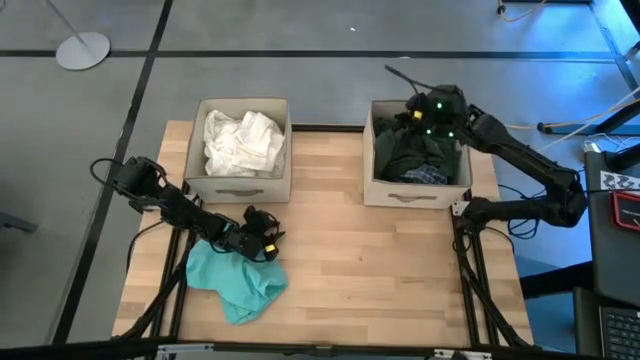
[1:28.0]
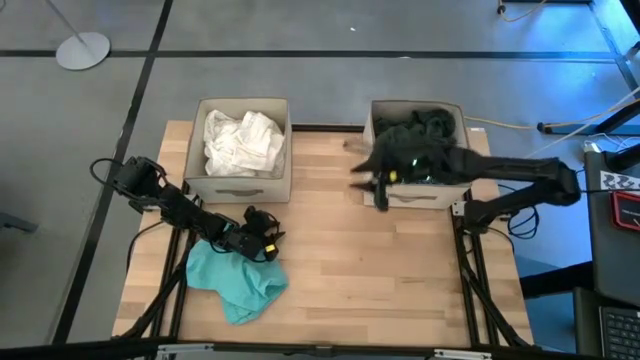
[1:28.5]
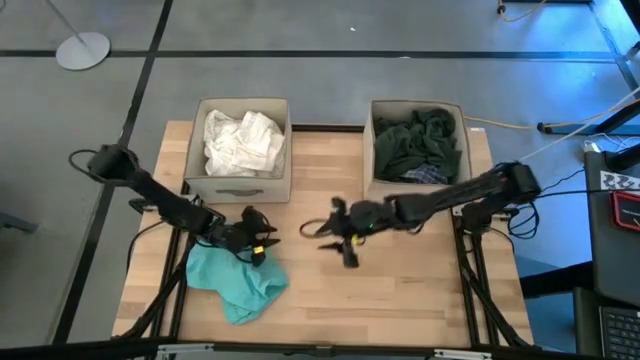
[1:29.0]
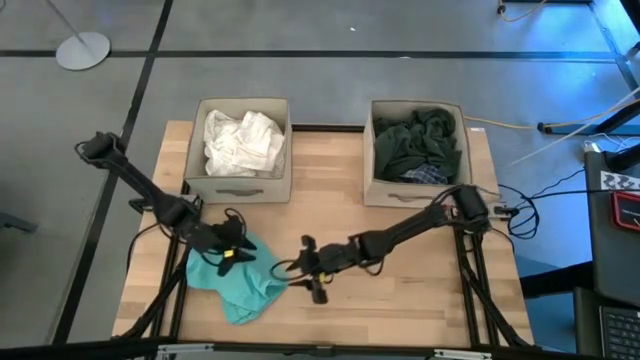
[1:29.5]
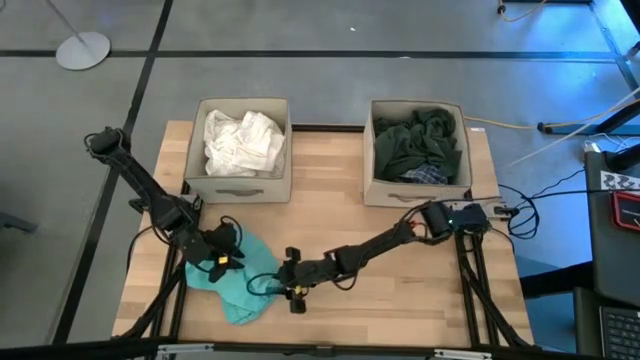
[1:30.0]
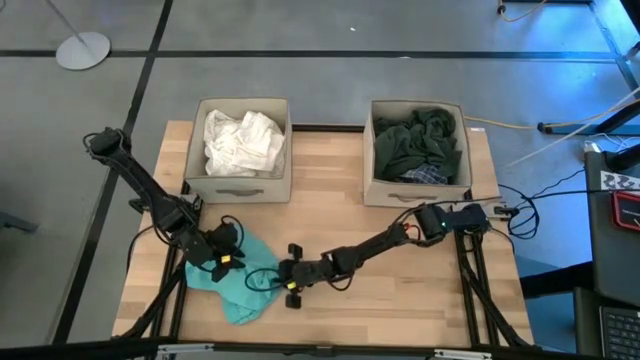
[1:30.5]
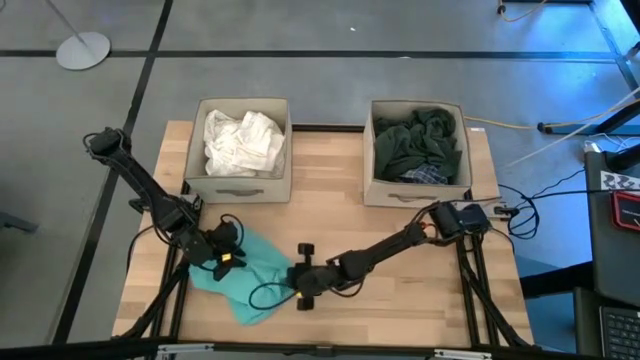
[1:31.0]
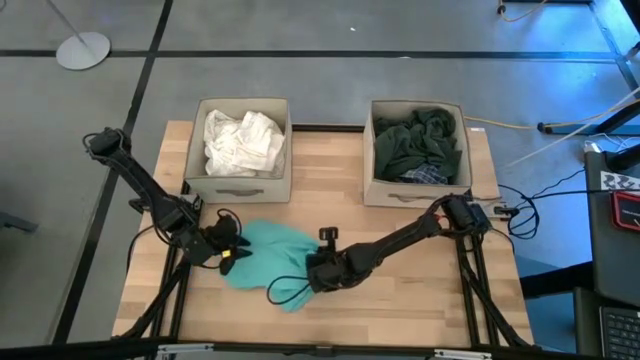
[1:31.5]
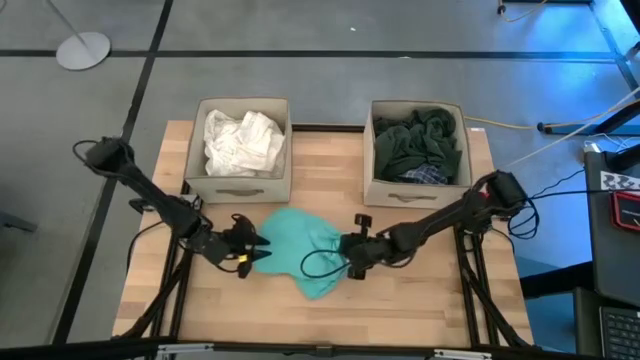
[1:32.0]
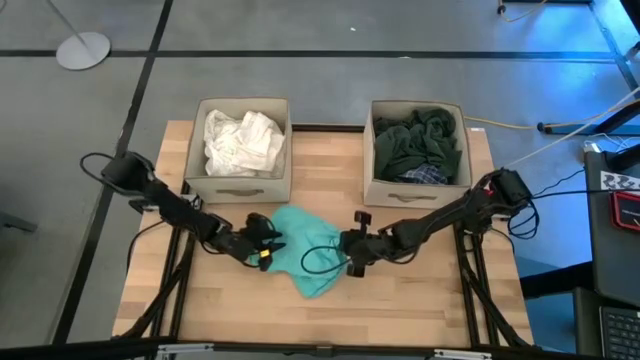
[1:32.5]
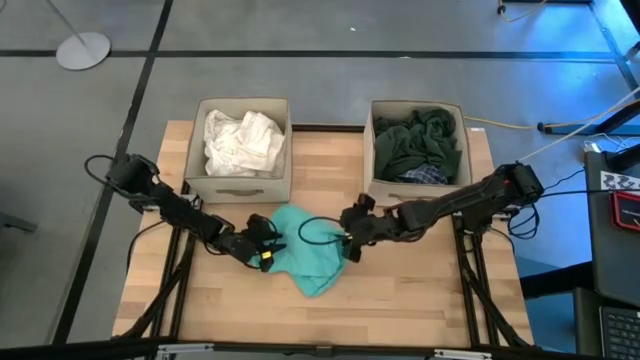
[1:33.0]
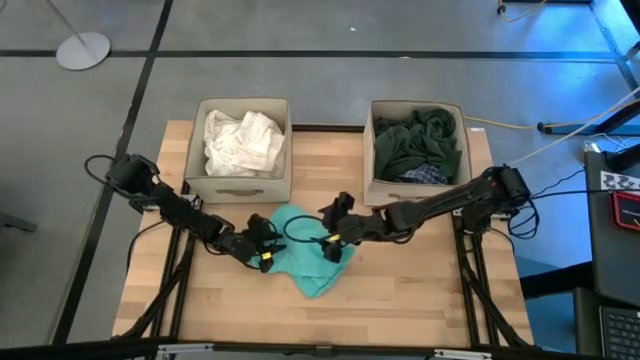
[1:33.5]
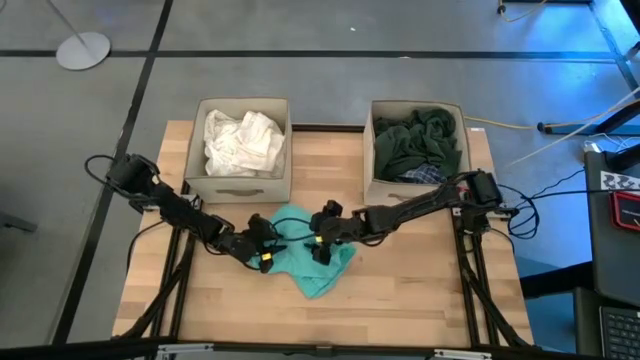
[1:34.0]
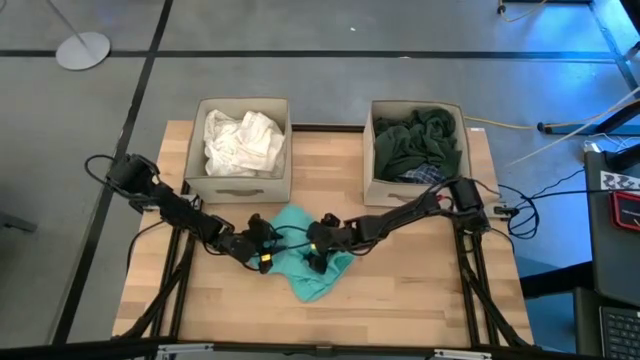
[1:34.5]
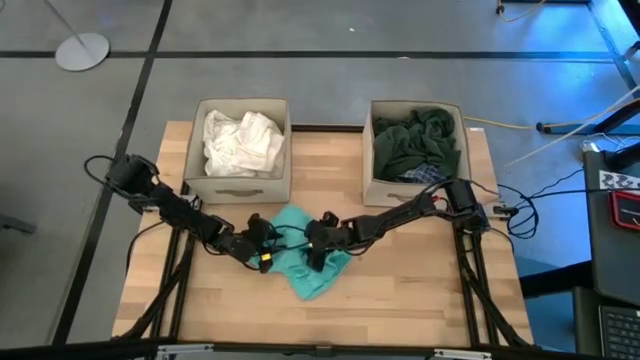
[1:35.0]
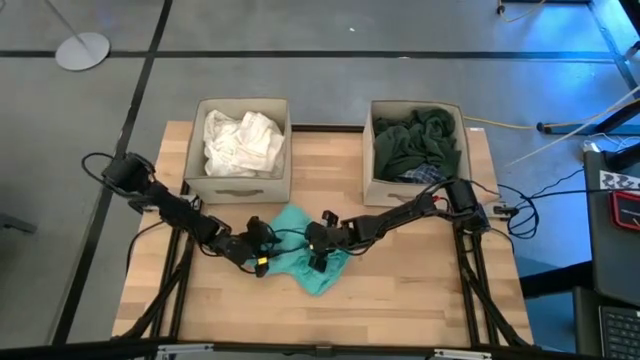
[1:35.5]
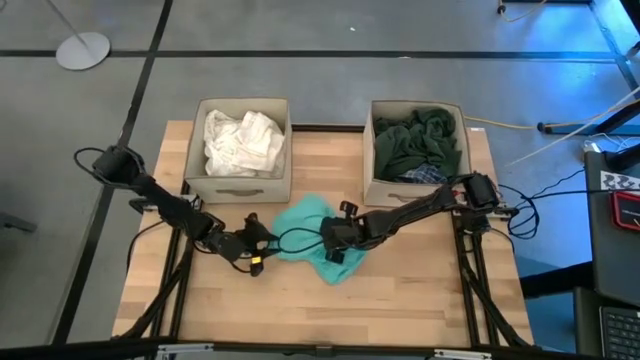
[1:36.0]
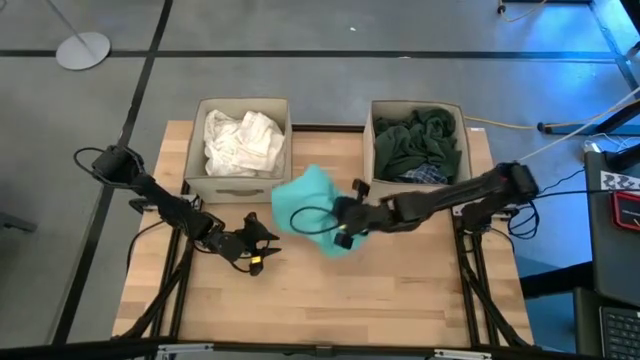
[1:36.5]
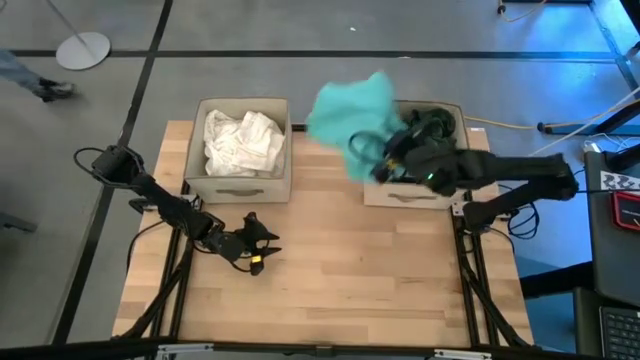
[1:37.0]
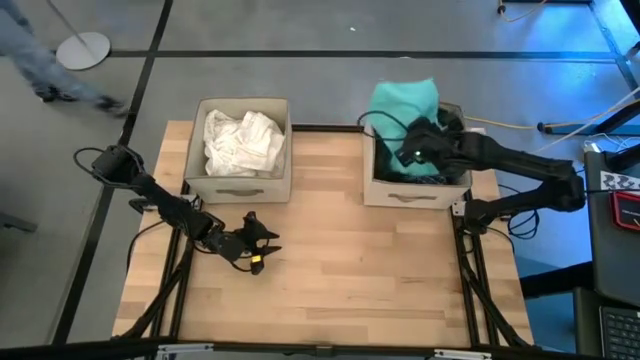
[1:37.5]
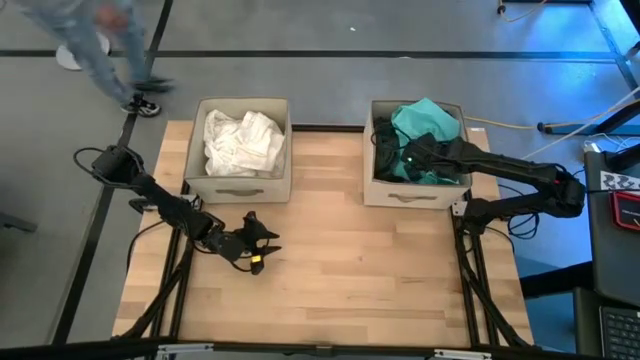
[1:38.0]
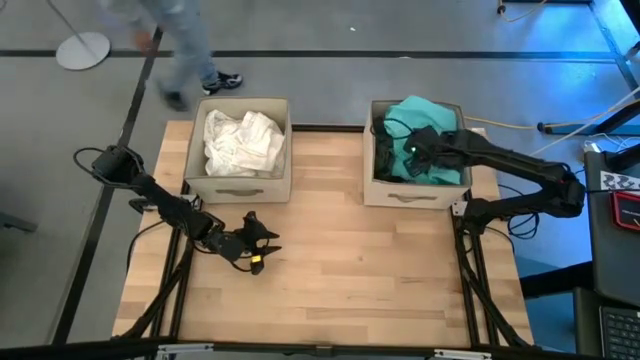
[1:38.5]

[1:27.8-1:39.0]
Task: Sort clothes
Put the blue shorts into the right brown bin

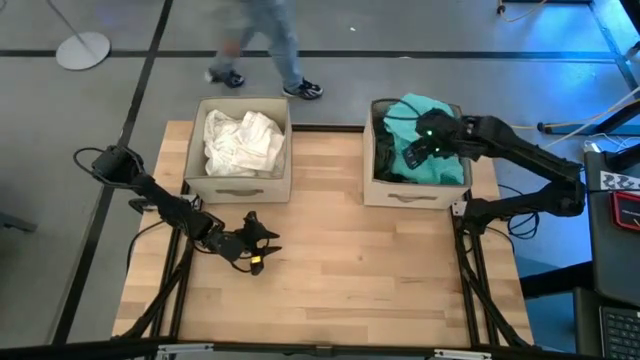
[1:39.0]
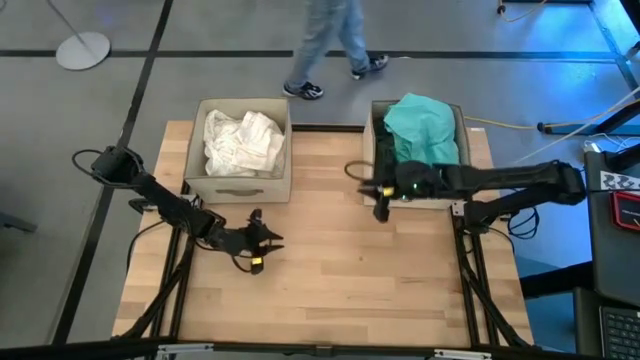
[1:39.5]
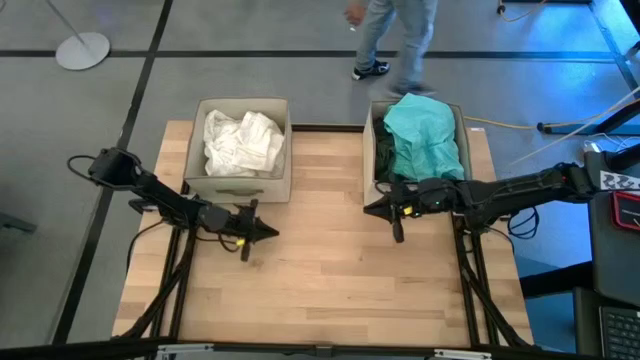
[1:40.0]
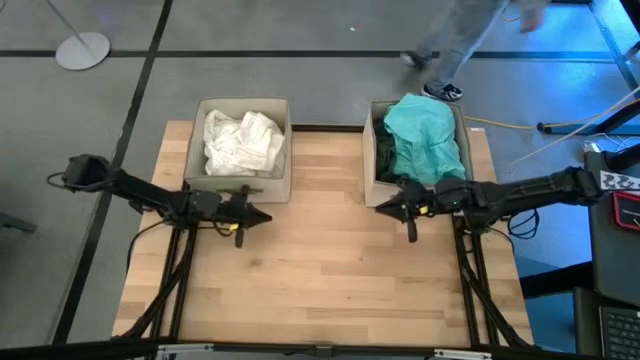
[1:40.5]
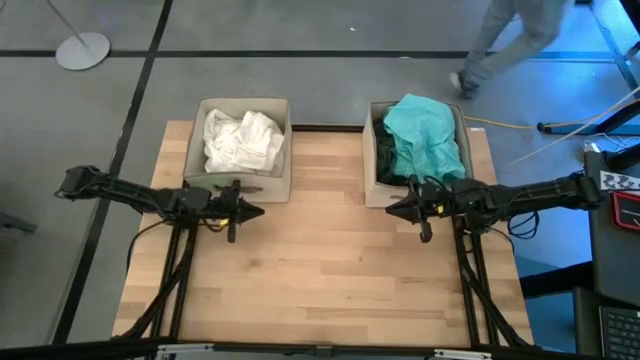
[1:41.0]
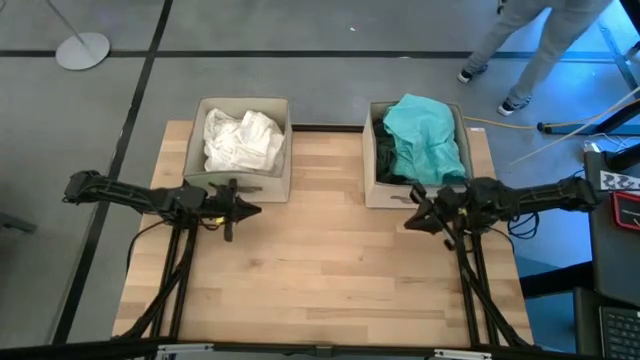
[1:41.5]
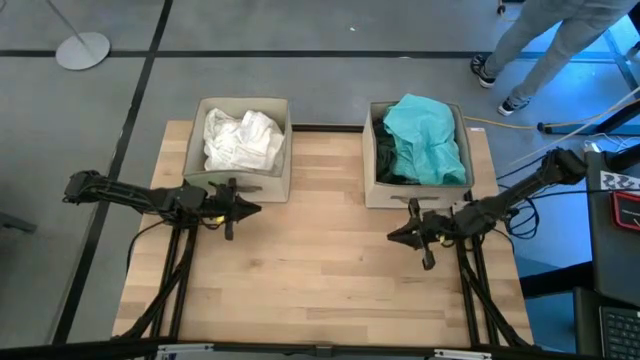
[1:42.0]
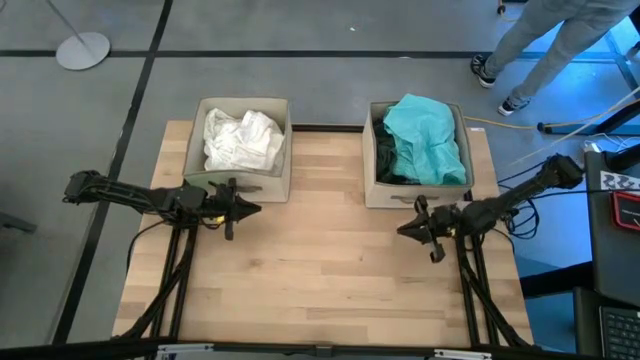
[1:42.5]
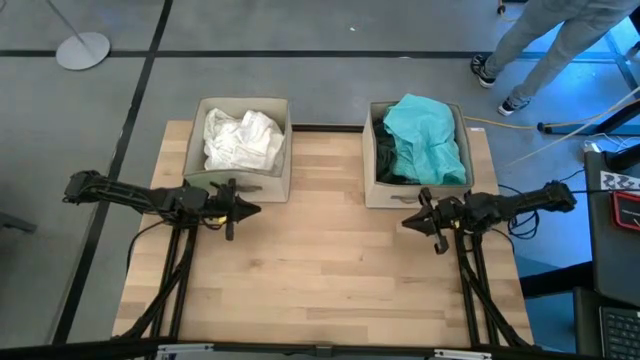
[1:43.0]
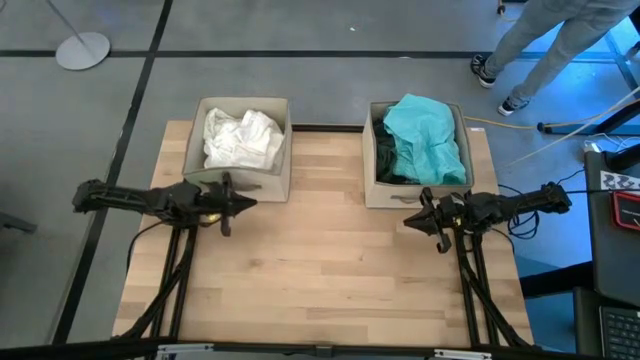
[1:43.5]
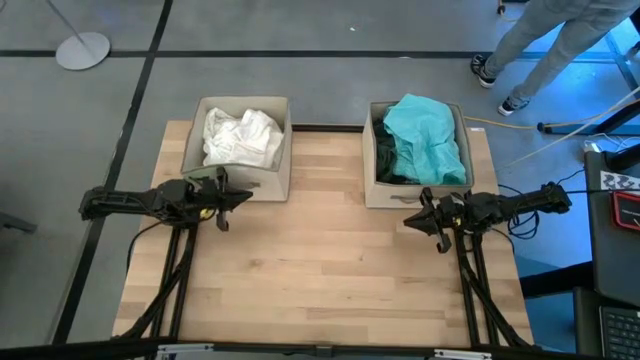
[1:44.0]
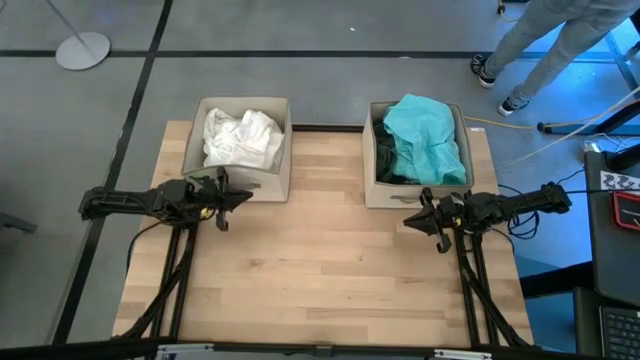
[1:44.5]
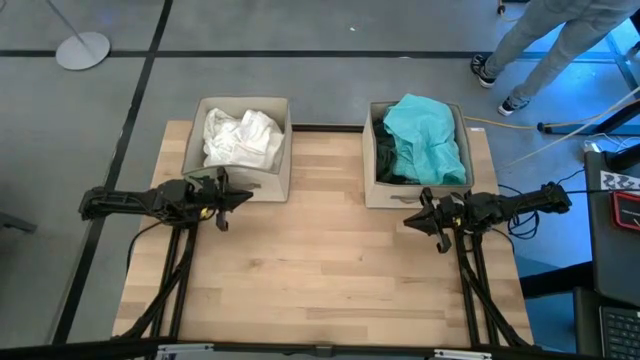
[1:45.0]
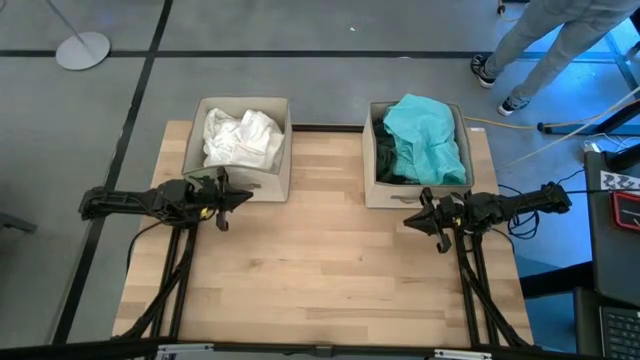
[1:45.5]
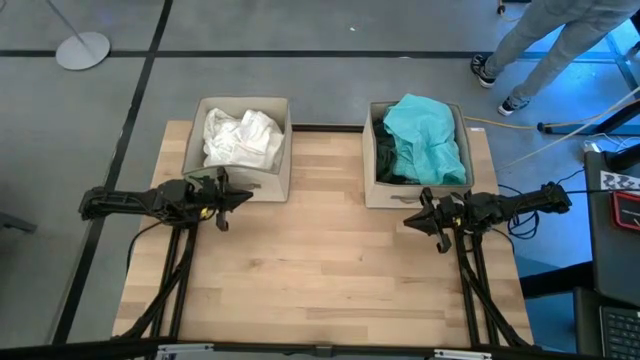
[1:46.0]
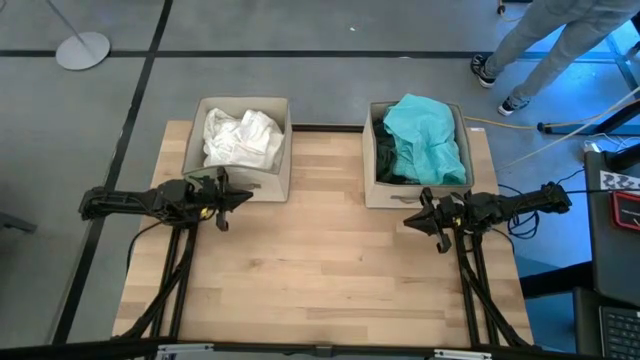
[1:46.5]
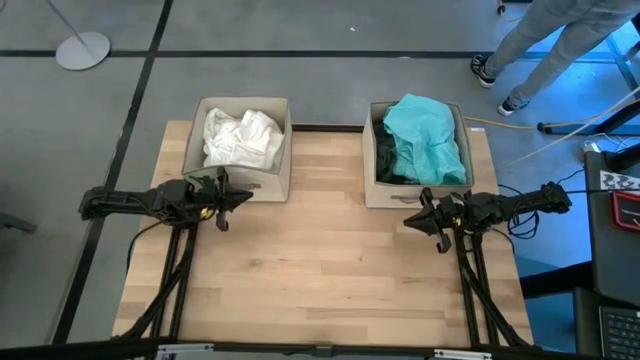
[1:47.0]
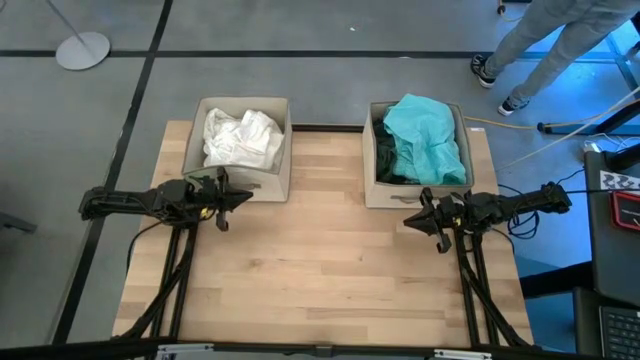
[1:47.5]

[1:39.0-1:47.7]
Return to Home Position
